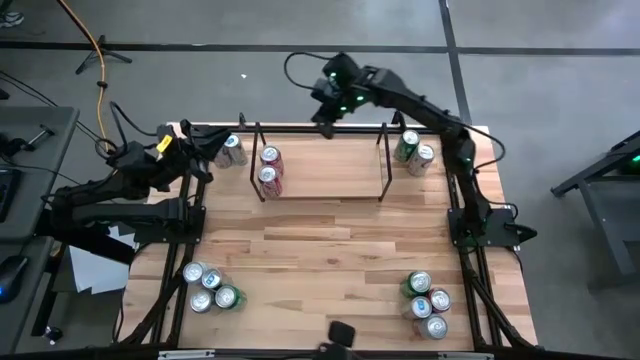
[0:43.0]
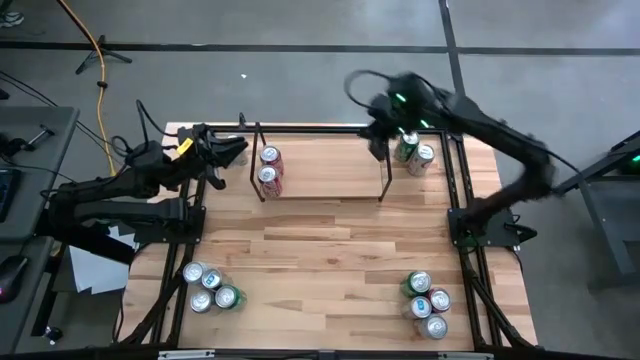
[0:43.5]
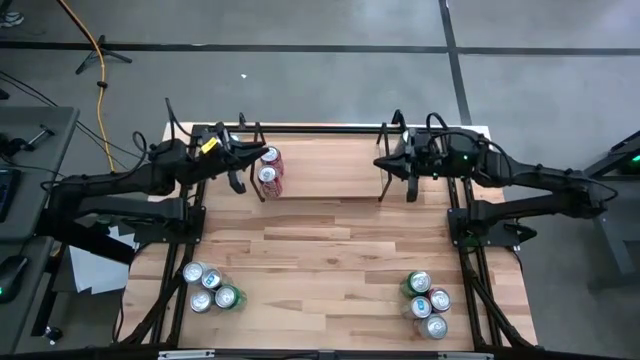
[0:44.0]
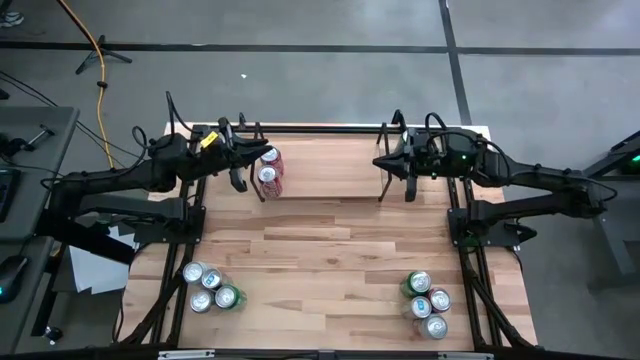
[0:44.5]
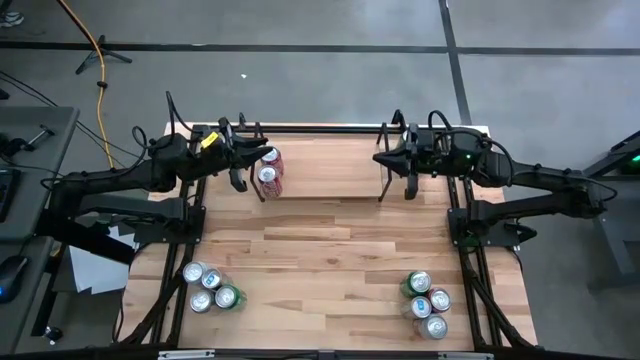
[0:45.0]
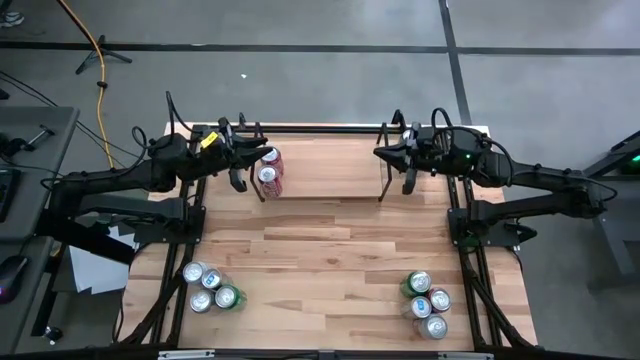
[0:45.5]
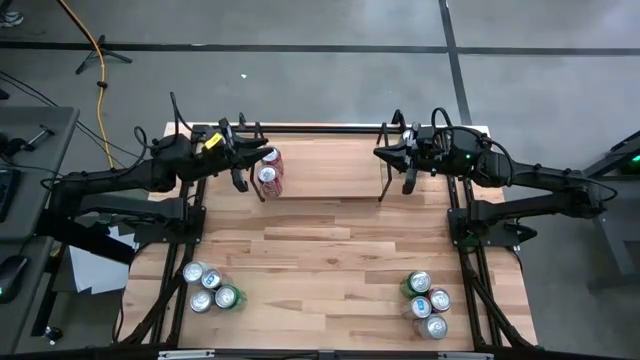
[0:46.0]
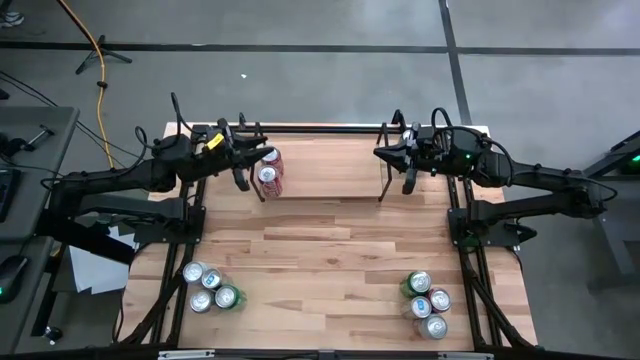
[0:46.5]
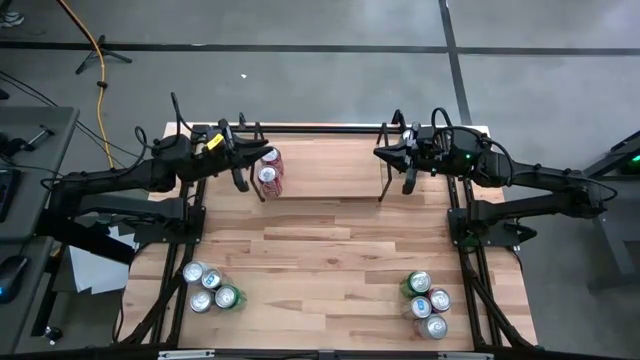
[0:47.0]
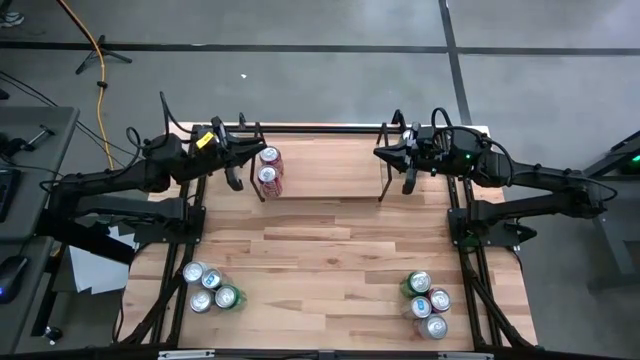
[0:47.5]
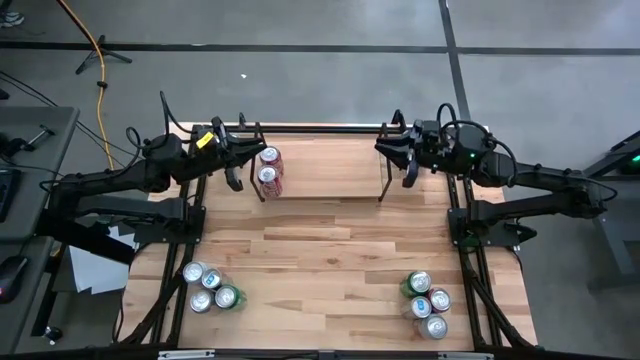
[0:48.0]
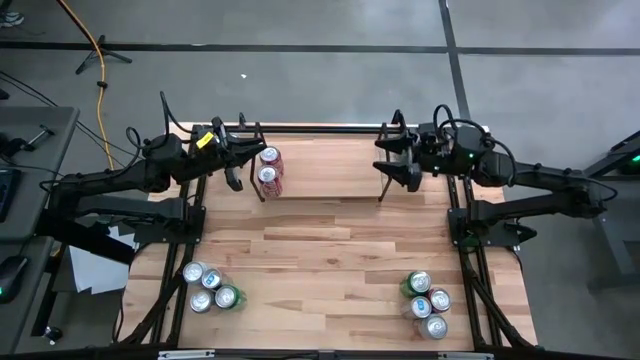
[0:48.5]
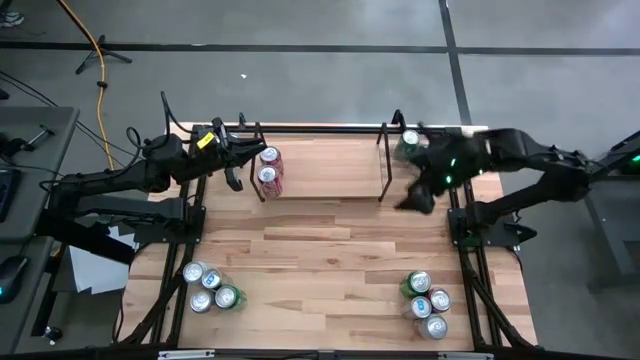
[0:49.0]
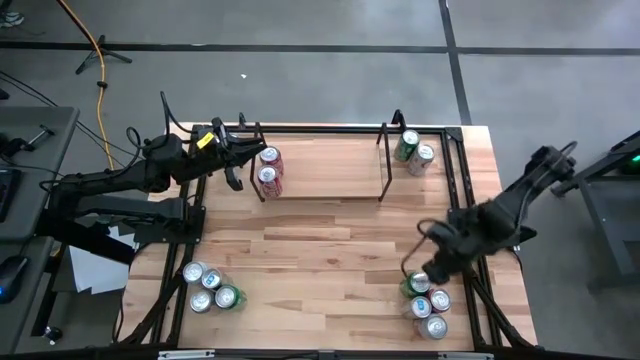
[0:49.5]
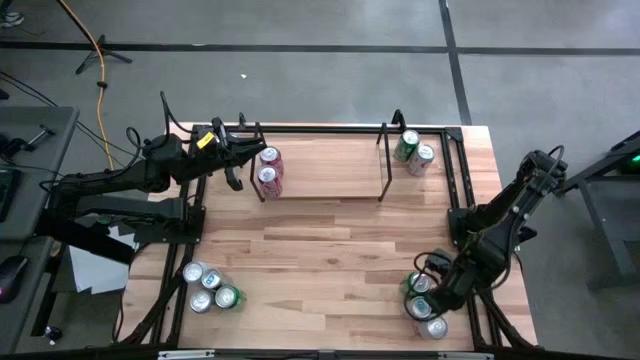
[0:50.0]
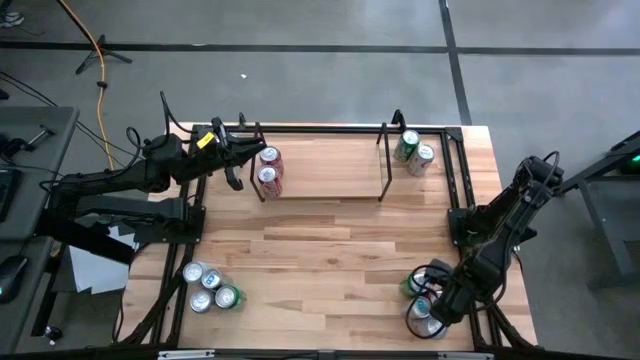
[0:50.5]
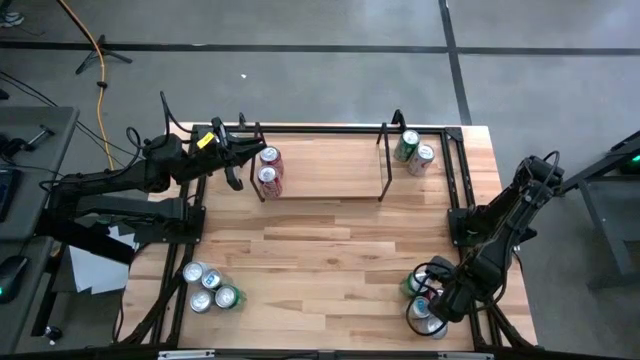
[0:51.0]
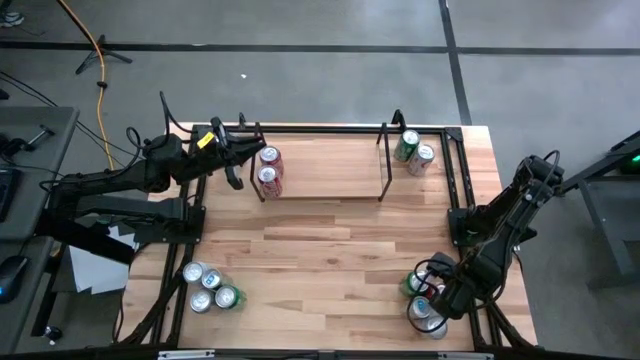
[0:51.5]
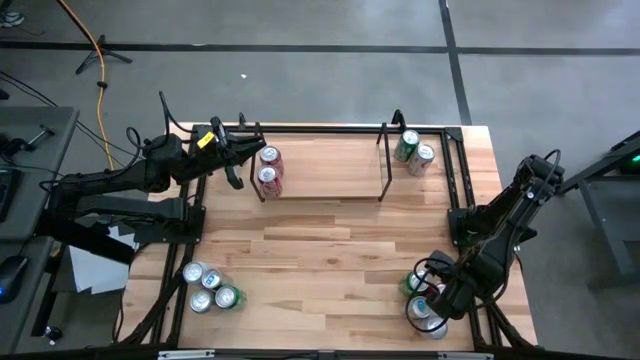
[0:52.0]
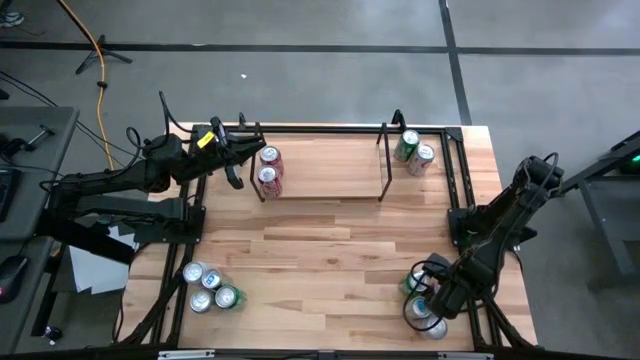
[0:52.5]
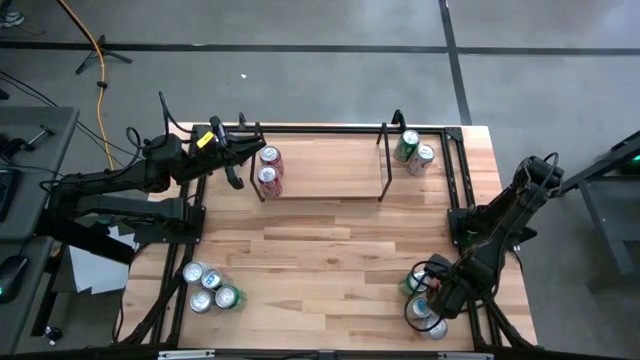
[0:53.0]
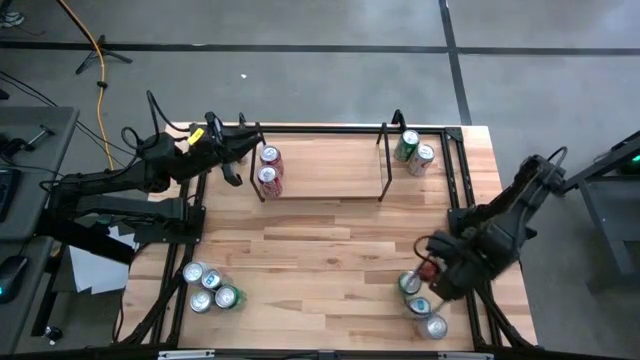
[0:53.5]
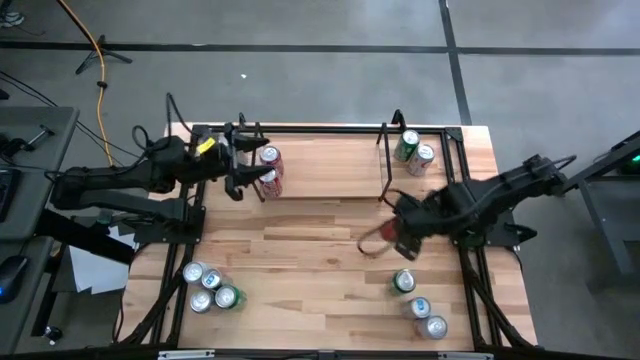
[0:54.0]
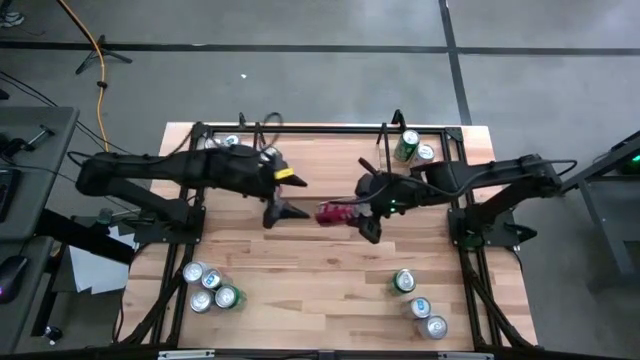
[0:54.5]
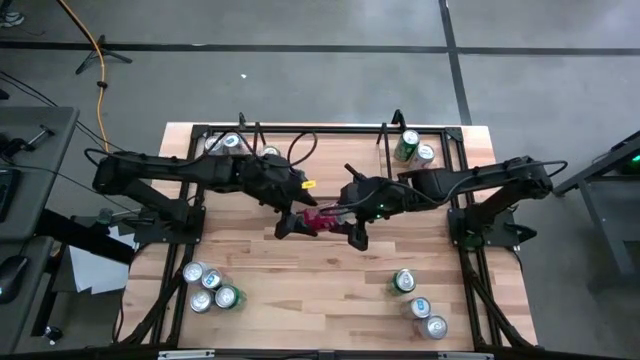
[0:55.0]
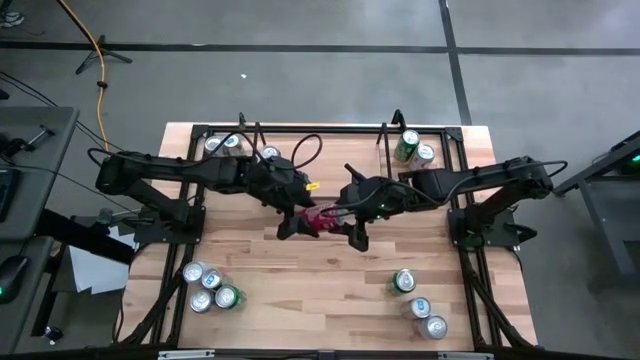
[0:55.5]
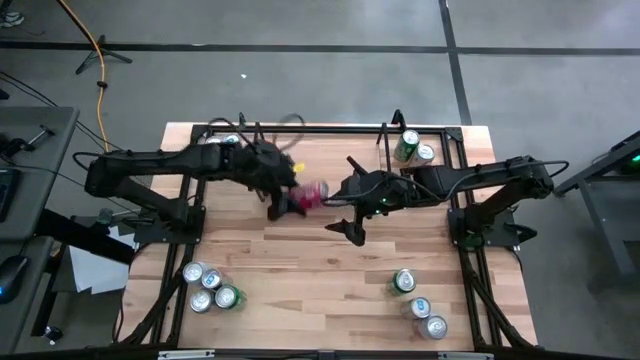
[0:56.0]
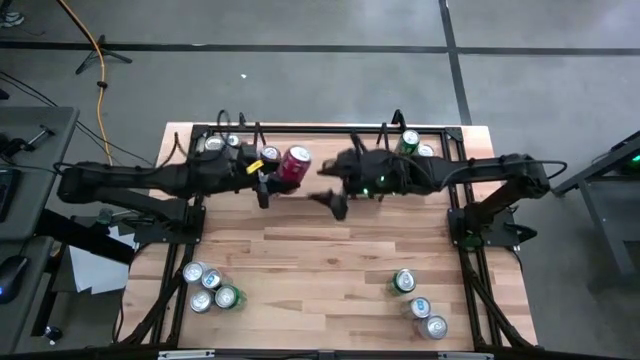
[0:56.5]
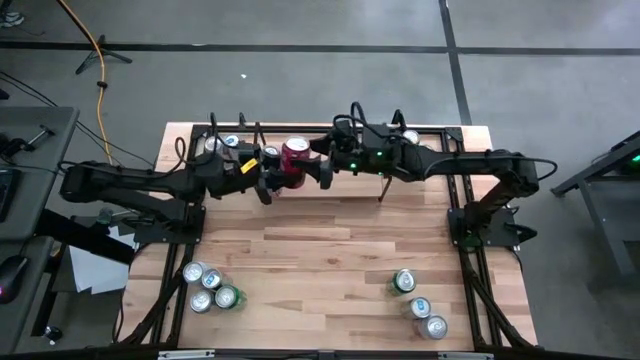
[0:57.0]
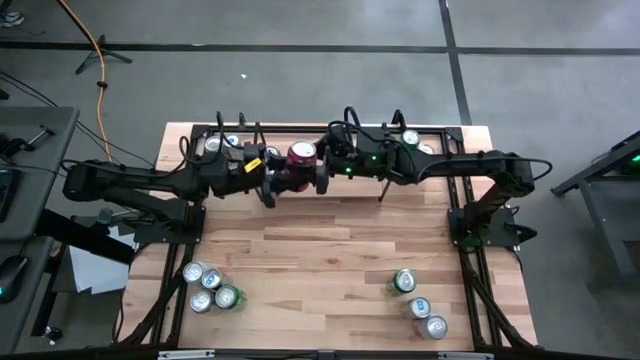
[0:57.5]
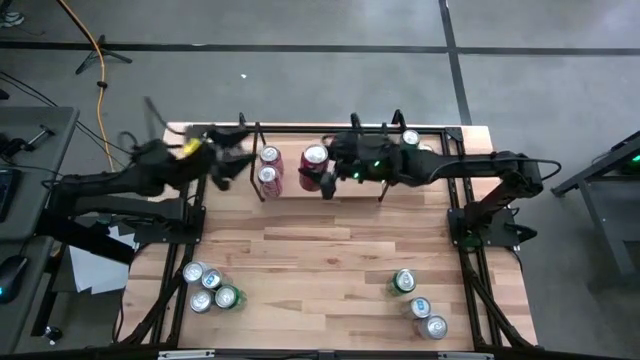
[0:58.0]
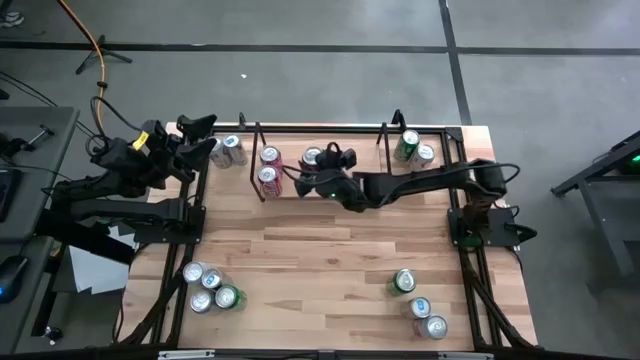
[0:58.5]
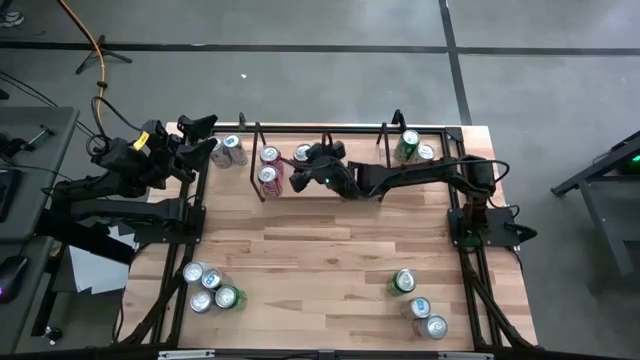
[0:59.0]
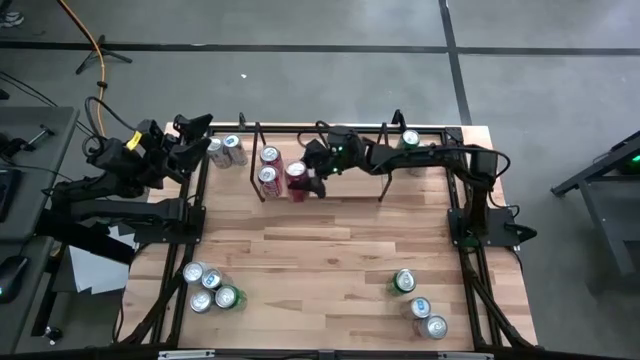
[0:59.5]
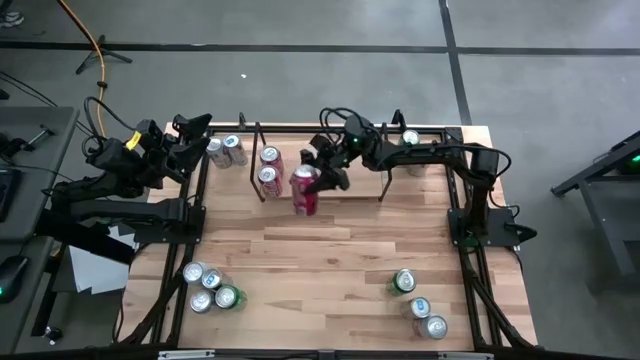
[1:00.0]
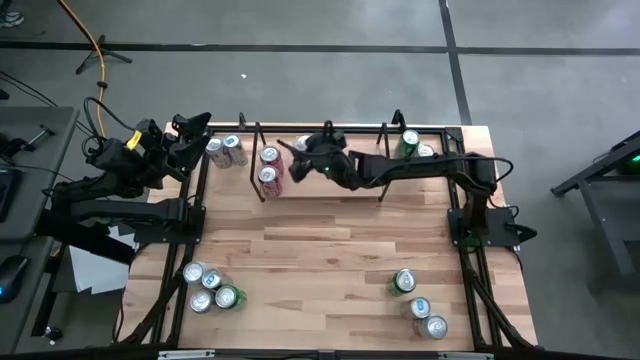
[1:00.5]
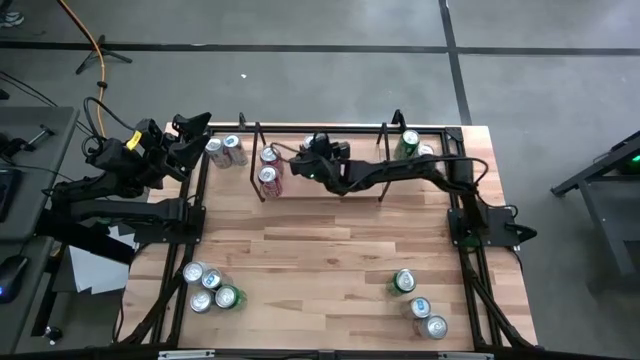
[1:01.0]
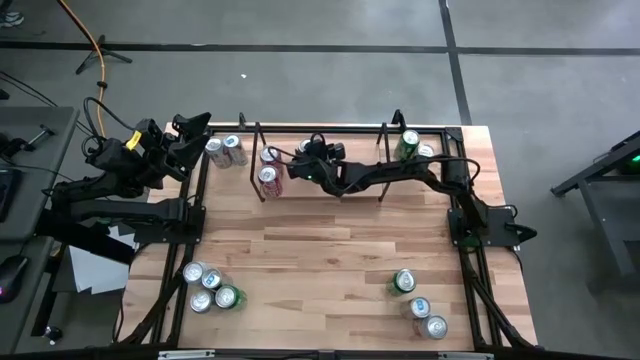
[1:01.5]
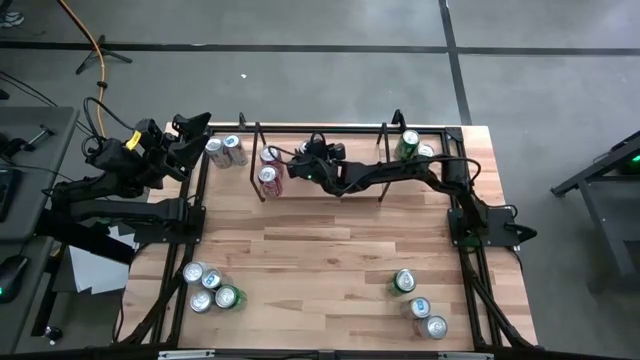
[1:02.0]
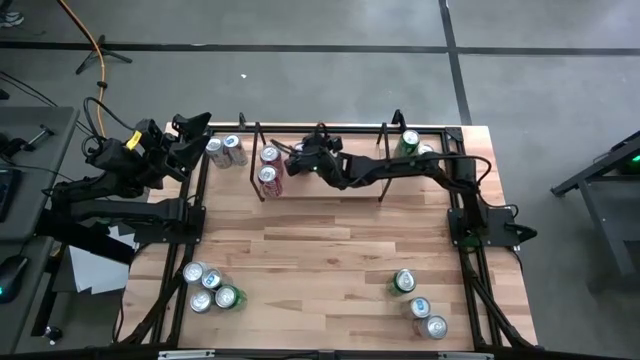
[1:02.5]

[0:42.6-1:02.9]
Task: Place canned beverage on shelf
Put the red soda can on the shelf aligned with the other red soda cans

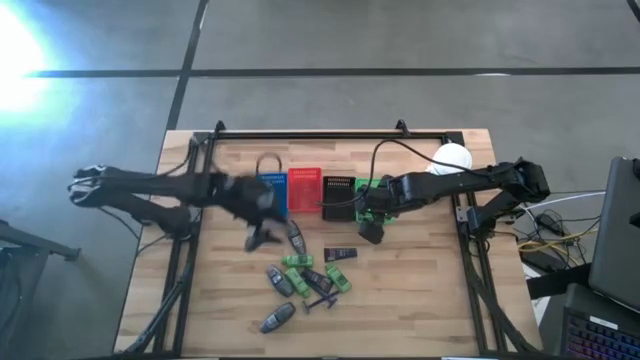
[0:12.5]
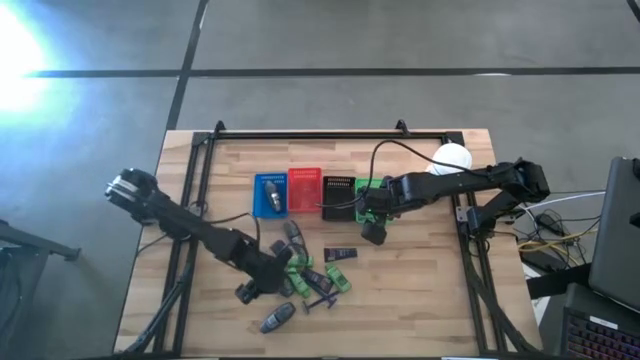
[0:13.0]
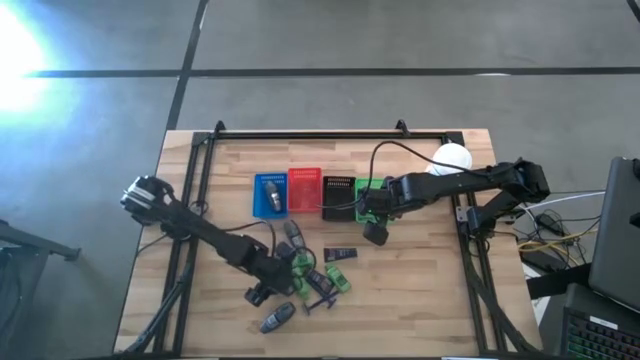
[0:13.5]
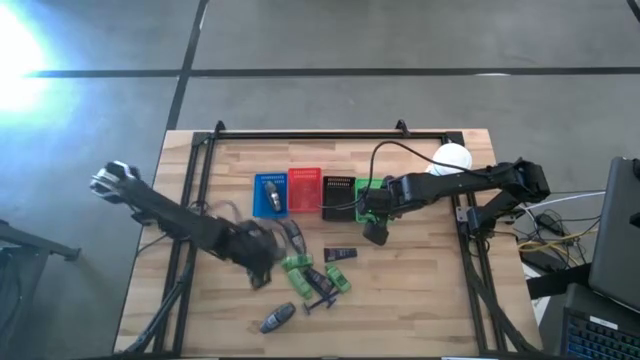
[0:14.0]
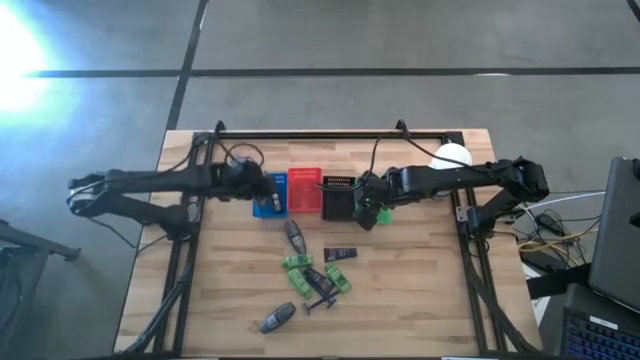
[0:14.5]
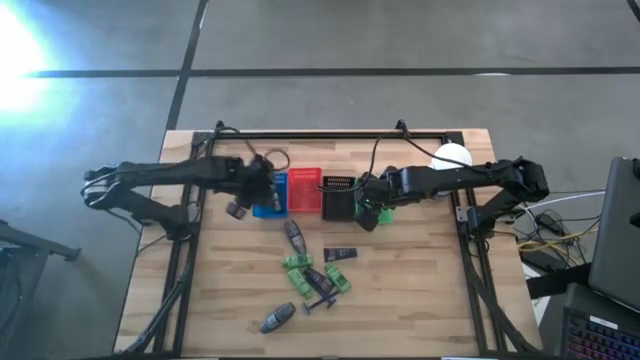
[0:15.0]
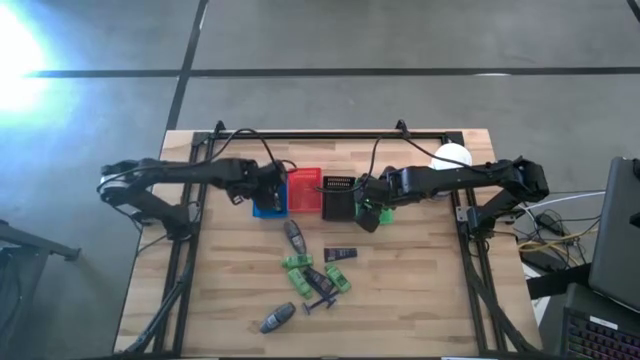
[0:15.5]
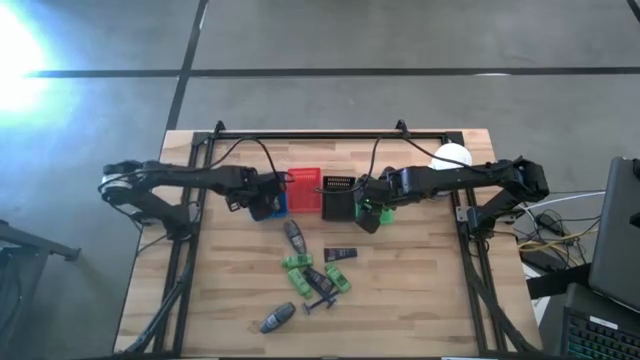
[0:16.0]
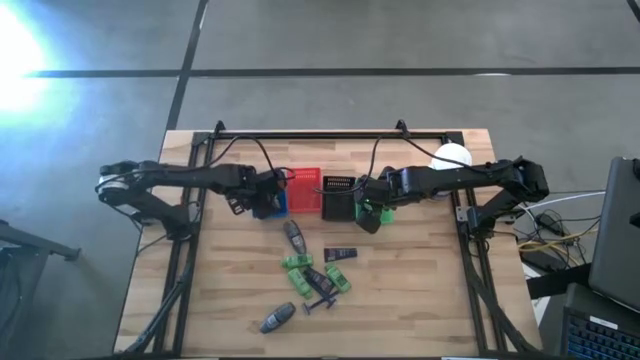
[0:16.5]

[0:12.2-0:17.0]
Task: Pick & Place Travel size toiletries
Put the gray deodorant into the blue bin
